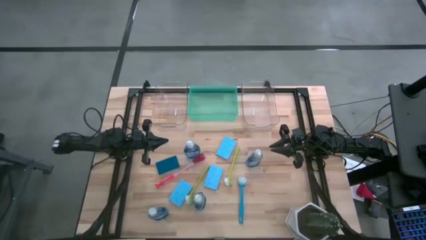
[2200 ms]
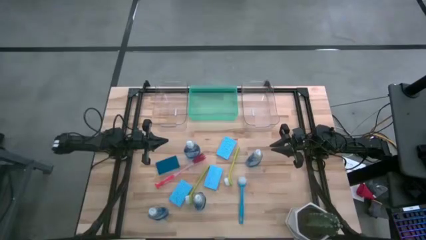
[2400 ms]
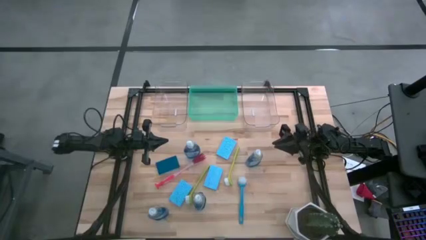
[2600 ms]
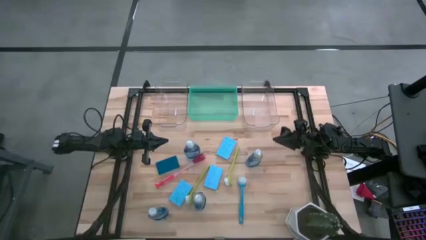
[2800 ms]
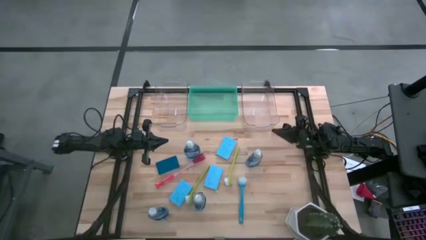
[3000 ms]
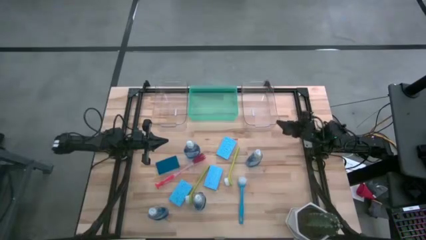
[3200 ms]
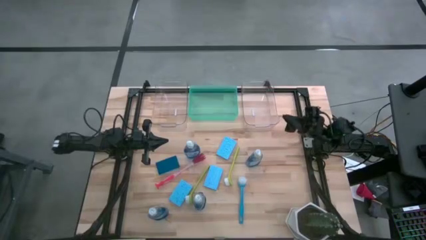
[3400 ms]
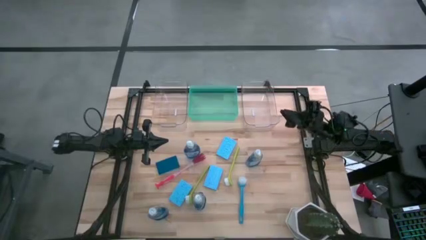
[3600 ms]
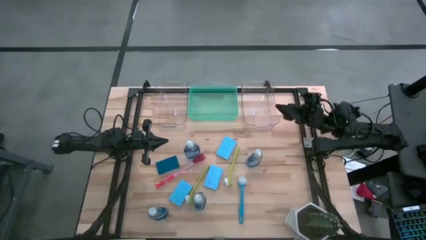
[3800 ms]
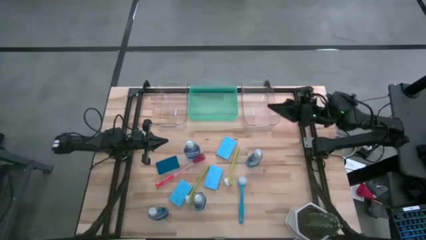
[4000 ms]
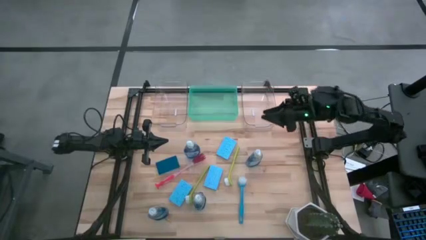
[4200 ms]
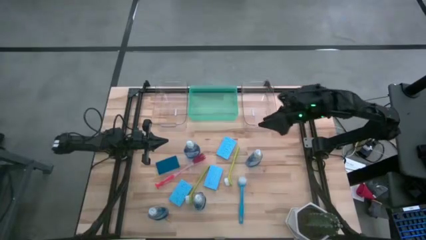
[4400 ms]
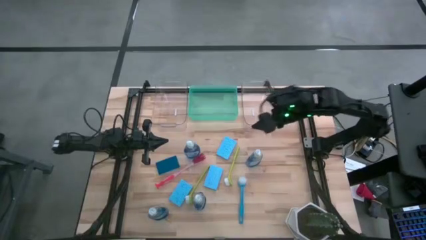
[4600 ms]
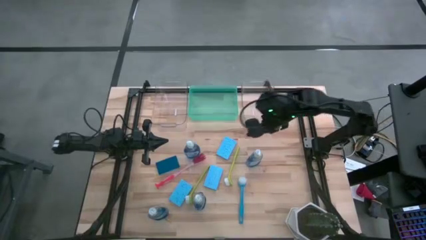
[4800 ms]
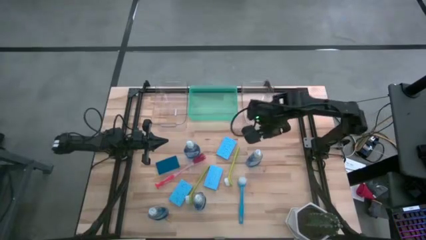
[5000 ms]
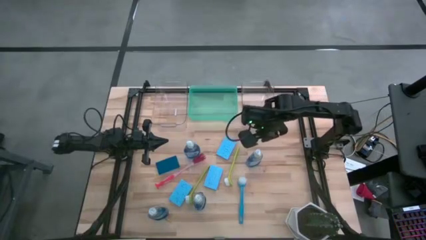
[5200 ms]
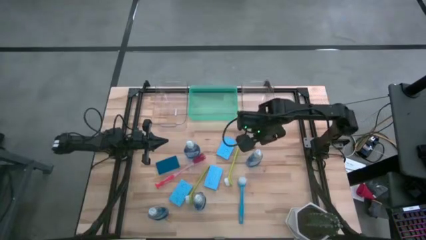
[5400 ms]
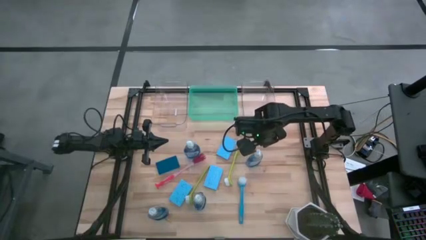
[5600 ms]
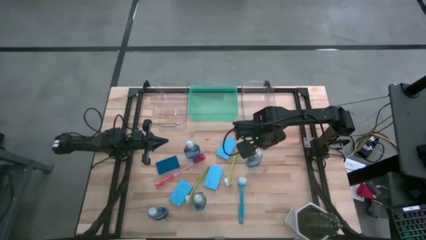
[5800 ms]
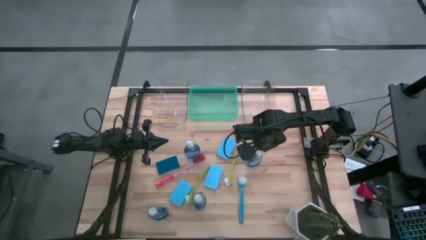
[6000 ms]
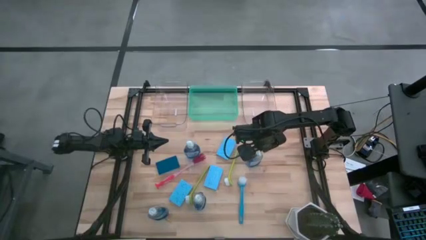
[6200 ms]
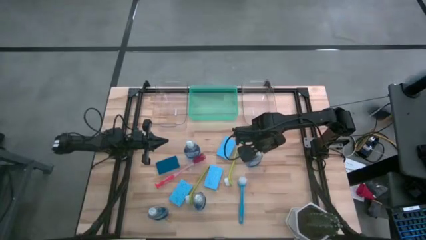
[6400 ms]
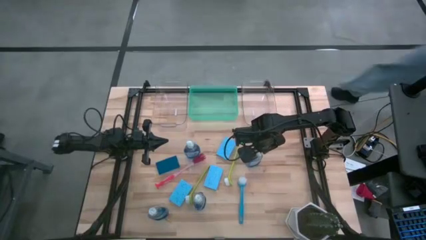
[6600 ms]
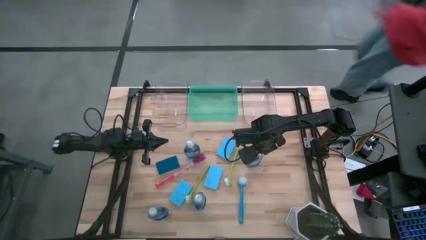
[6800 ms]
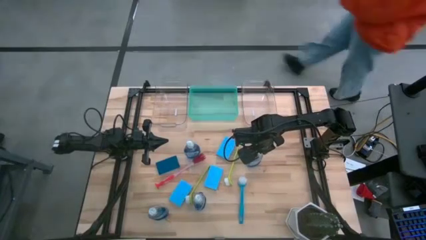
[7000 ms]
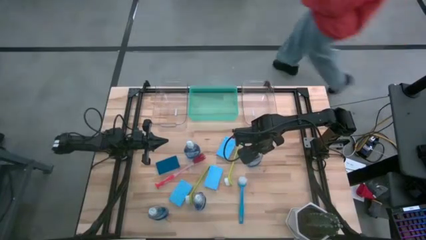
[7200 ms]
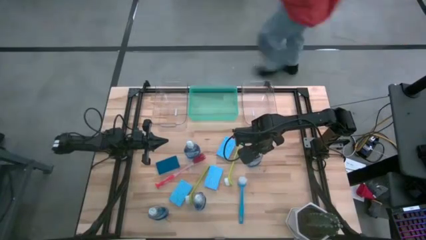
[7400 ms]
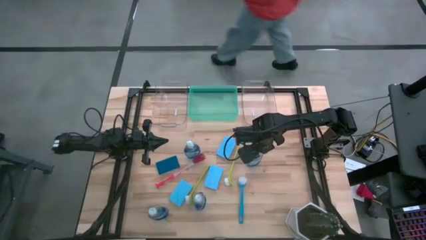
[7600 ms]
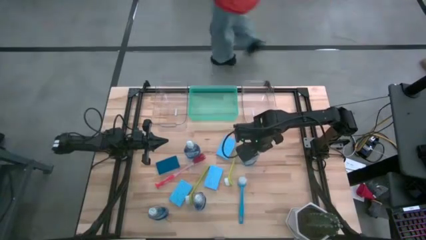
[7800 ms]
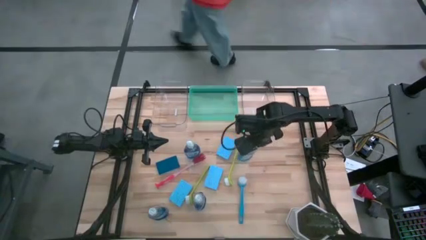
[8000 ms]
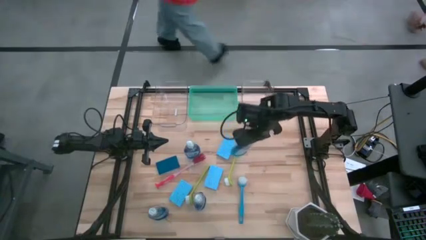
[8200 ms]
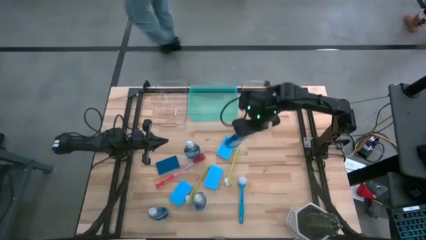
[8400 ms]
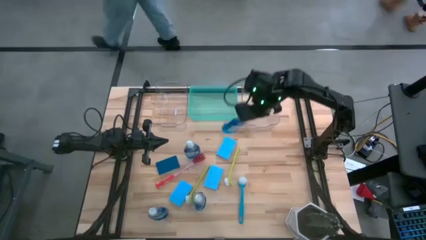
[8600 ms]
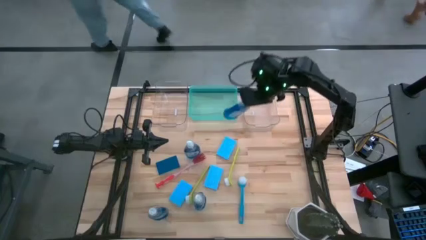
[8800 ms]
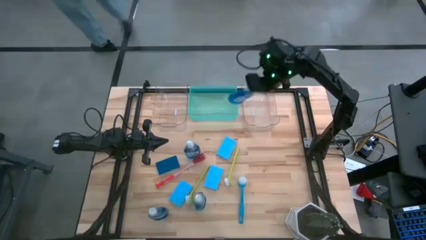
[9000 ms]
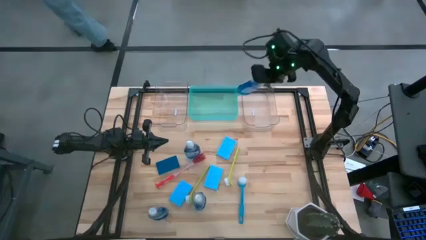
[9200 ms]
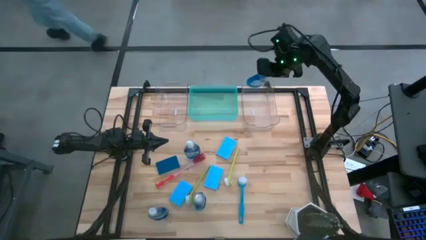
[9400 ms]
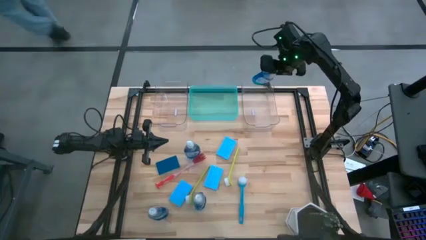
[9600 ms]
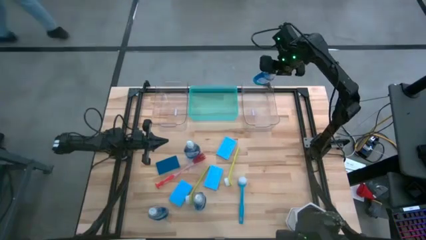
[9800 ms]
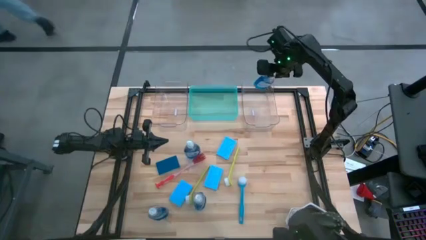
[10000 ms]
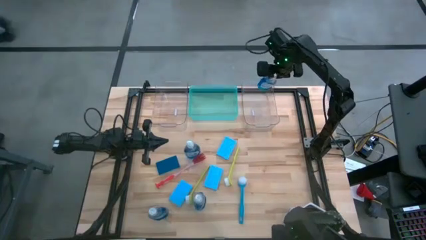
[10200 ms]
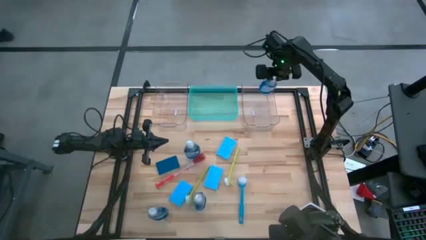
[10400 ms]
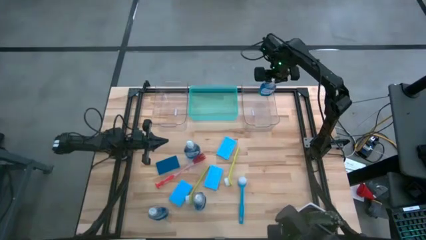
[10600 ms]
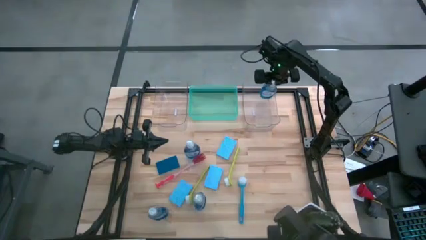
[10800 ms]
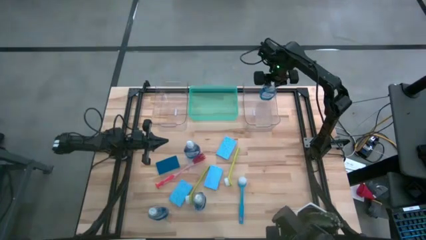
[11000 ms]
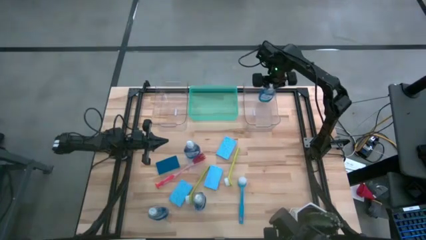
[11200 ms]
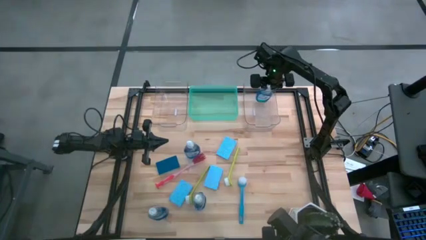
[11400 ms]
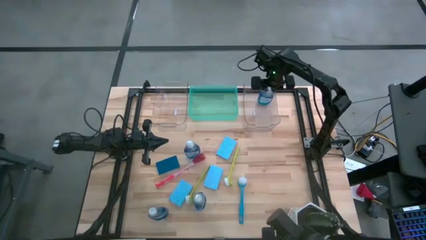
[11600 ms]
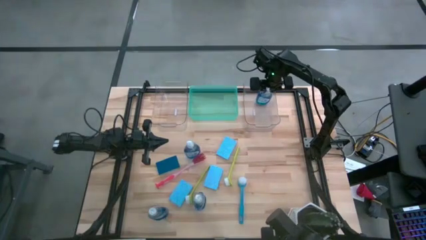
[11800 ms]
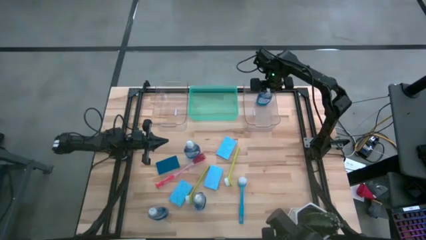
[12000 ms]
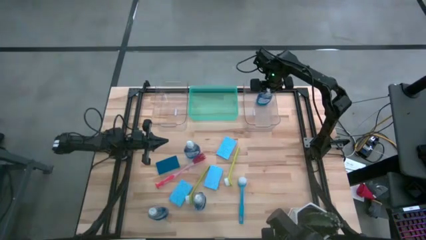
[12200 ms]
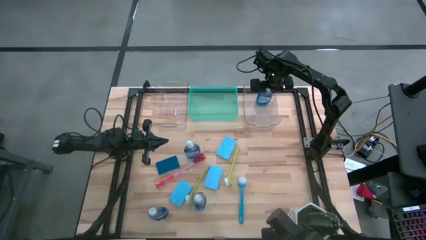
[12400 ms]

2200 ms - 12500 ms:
Task: Pick & Place Kitchen Sink Supplies
Put the blue dishwashing liquid bottle into the right transparent bin

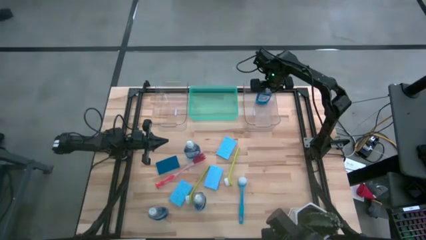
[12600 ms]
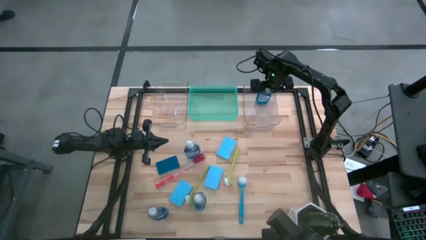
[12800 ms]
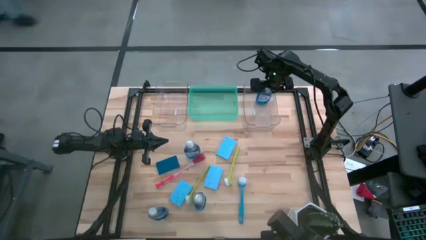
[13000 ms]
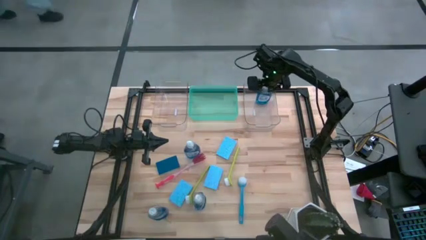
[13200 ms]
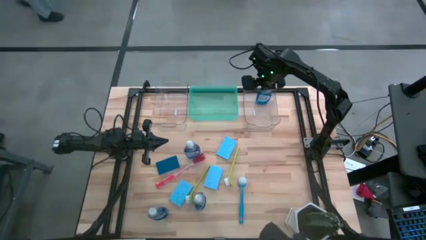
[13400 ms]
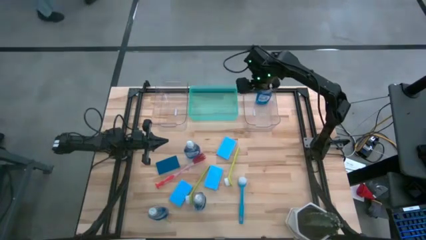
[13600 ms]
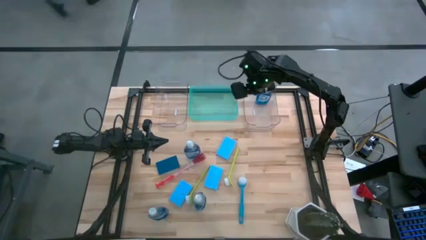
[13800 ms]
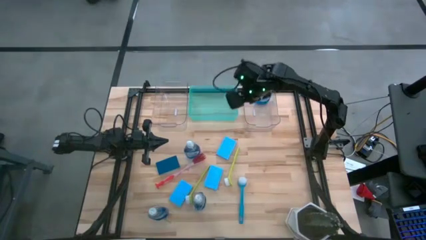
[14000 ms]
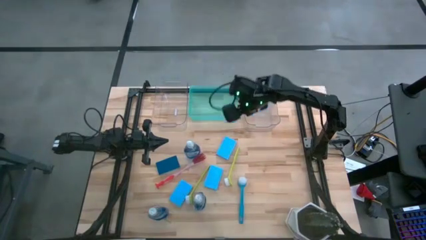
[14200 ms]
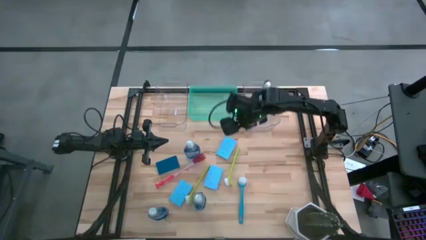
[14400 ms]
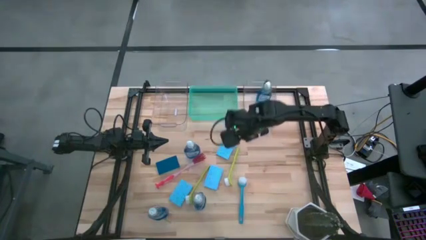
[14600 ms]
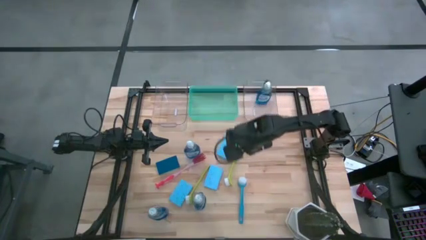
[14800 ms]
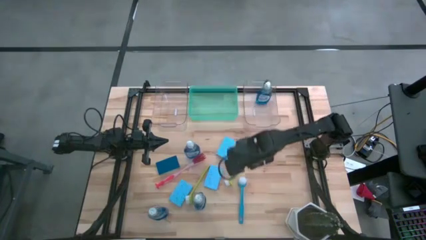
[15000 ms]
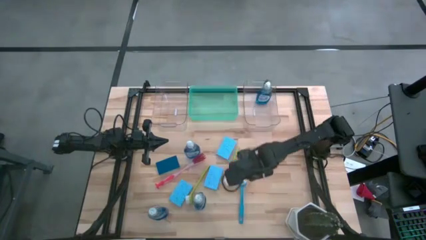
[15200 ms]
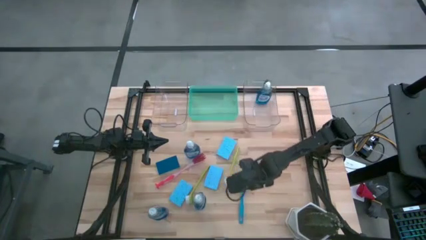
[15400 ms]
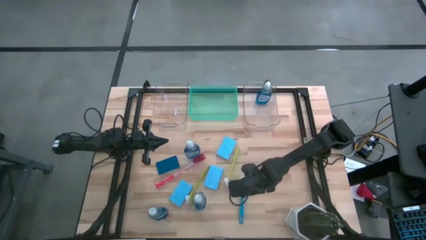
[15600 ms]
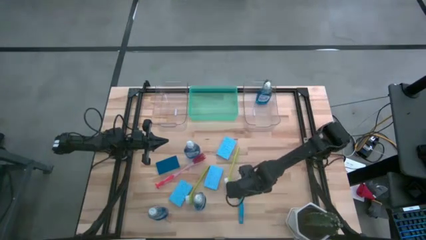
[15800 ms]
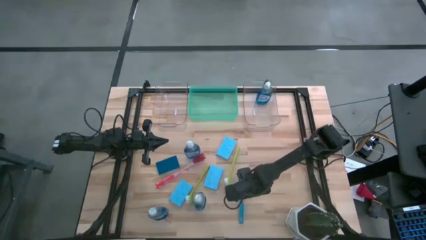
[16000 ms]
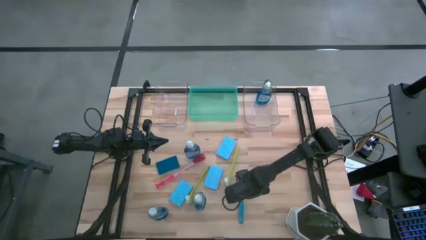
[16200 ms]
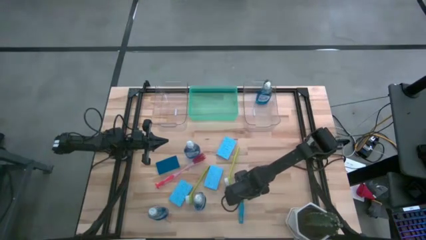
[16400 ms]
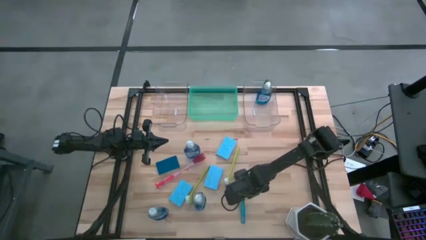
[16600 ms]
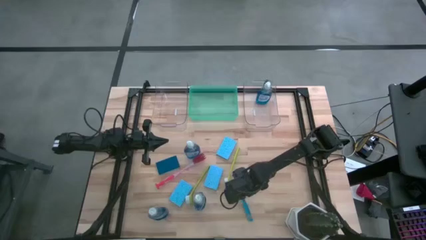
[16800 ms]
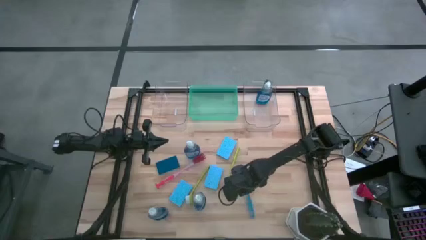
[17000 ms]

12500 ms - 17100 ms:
Put the blue dishwashing brush into the green bin

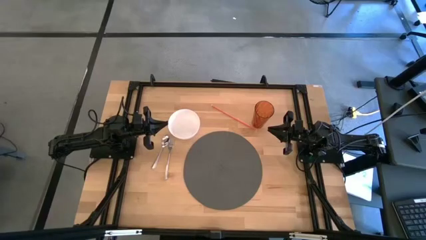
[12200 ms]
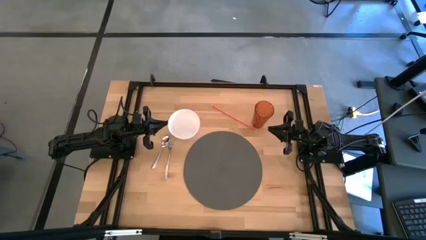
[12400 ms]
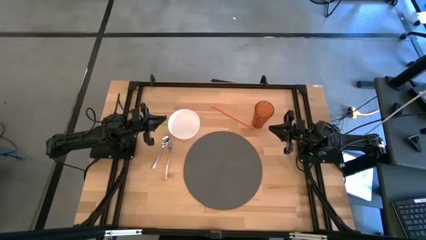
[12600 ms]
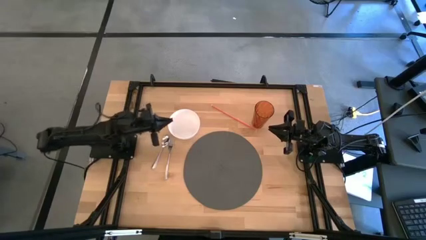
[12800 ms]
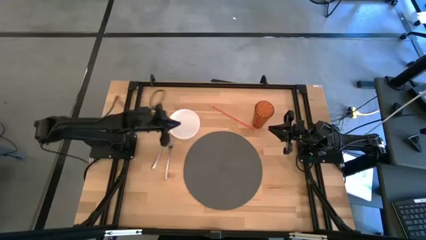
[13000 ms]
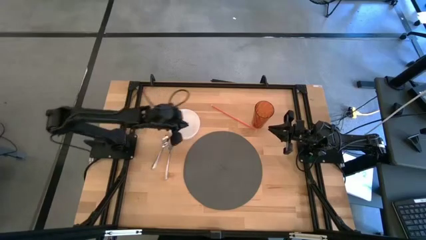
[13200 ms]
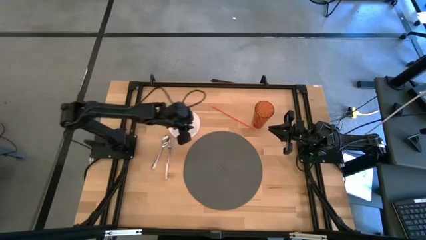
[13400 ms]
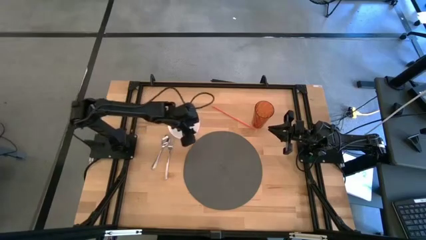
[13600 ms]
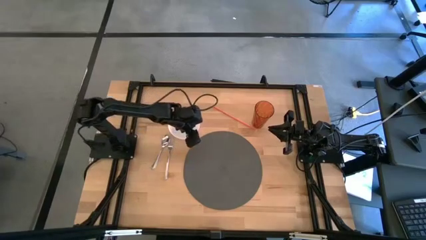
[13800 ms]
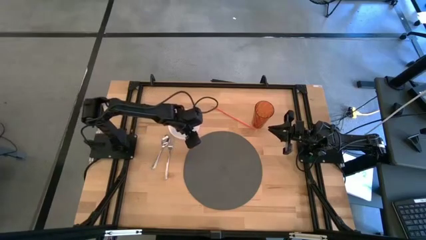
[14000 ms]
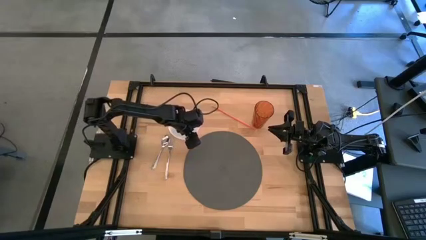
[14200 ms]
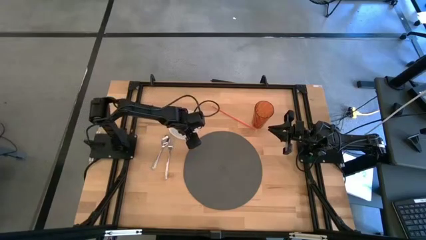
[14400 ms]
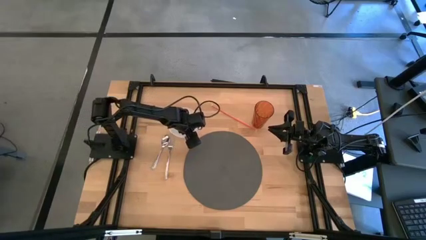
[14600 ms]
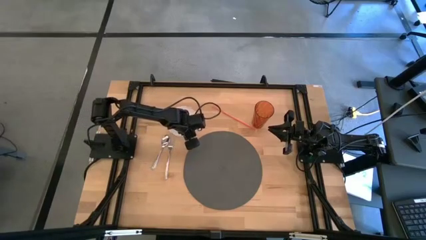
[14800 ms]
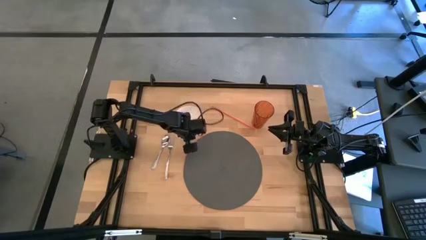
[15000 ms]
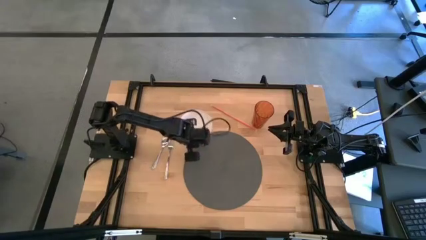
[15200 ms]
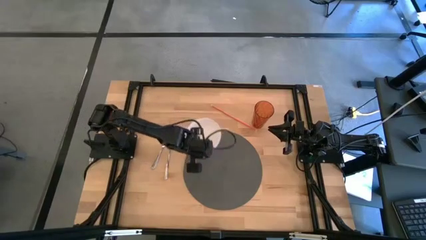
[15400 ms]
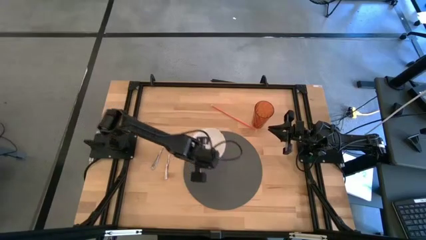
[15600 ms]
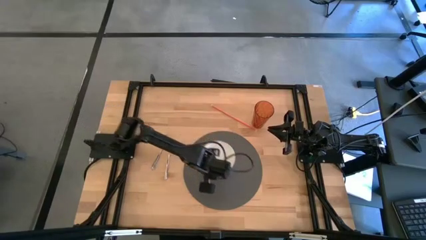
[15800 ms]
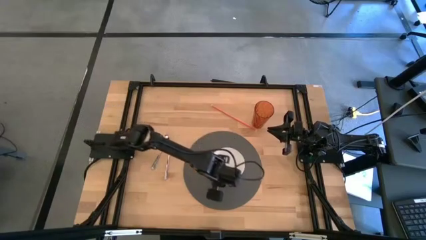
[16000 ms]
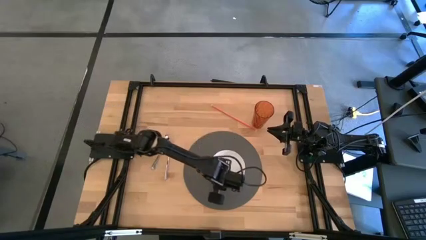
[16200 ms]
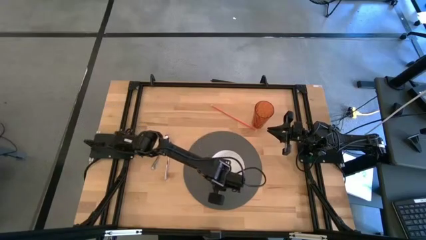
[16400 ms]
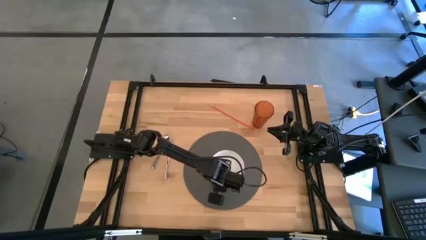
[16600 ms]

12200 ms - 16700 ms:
Task: Pick & Place Utensil
Put the white bowl on the gray mat
